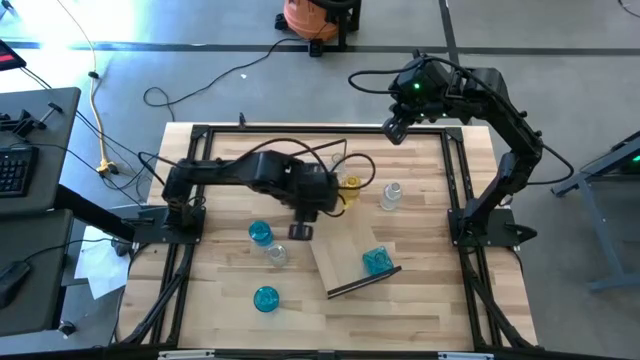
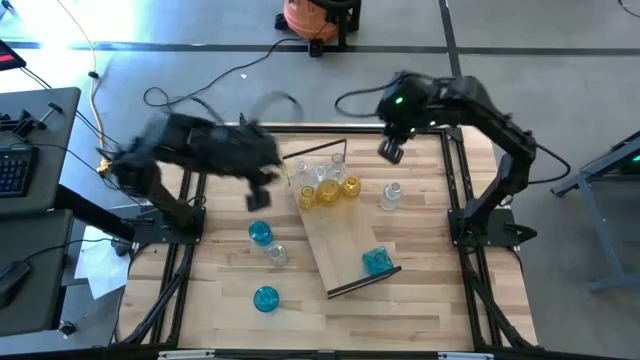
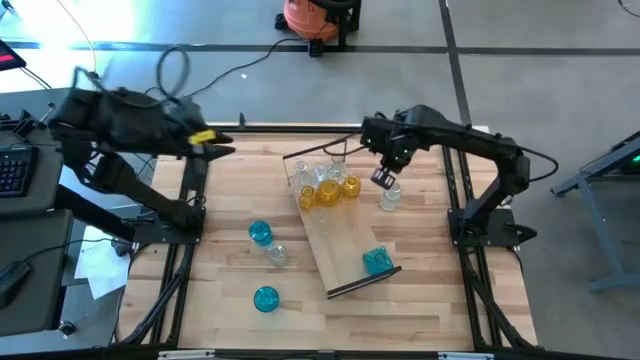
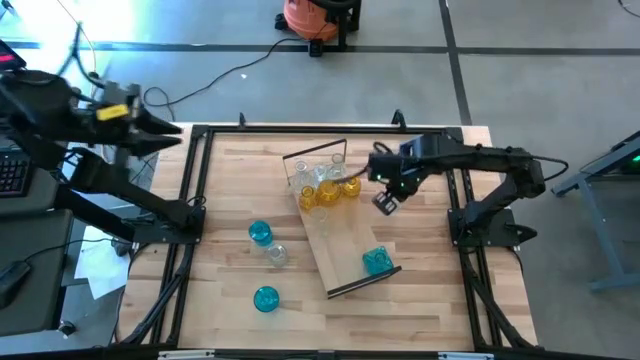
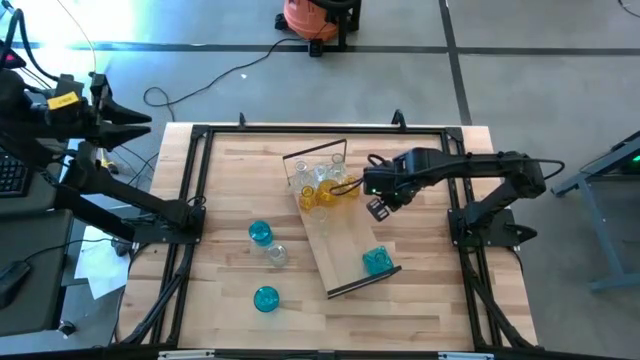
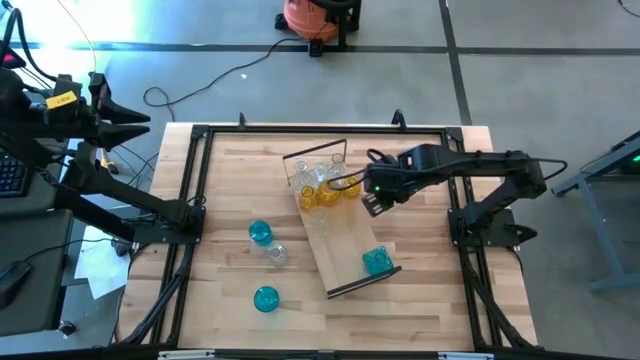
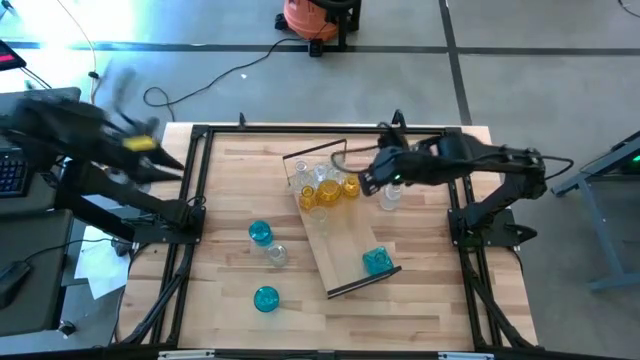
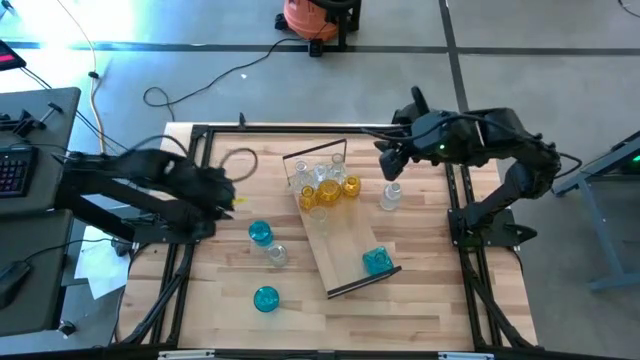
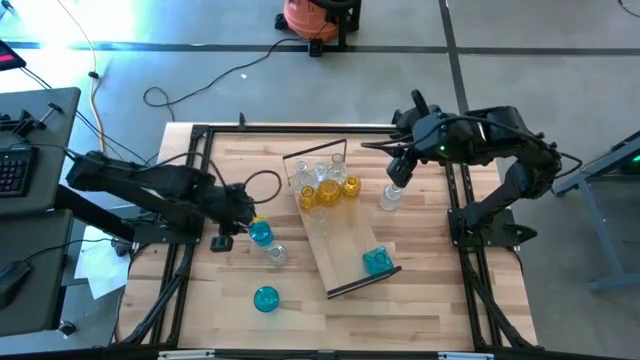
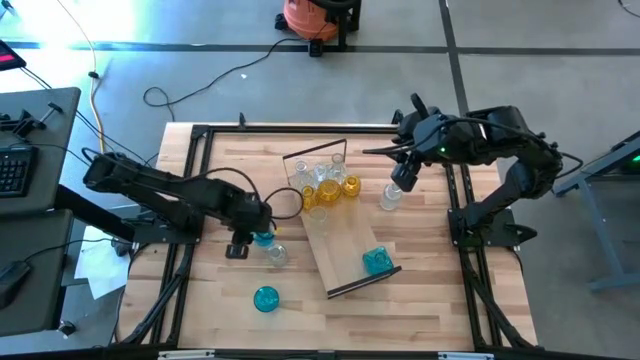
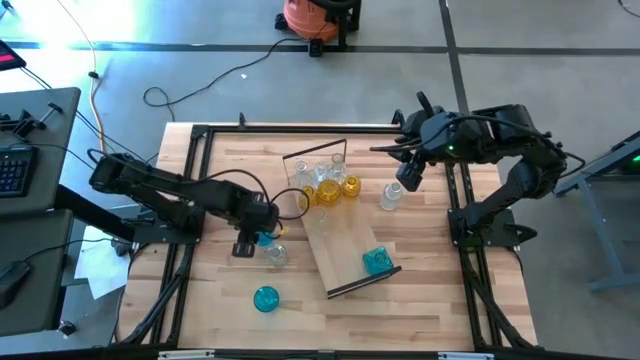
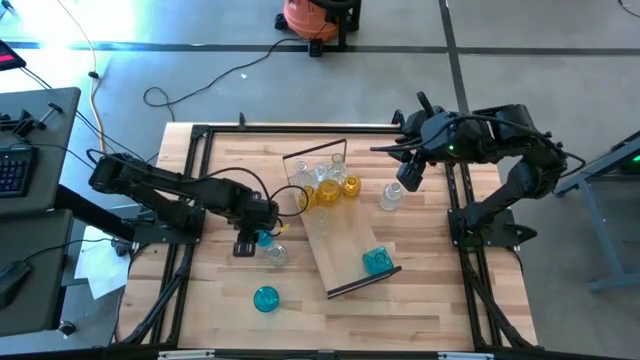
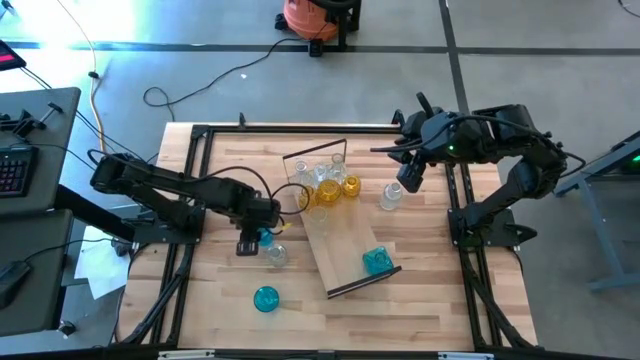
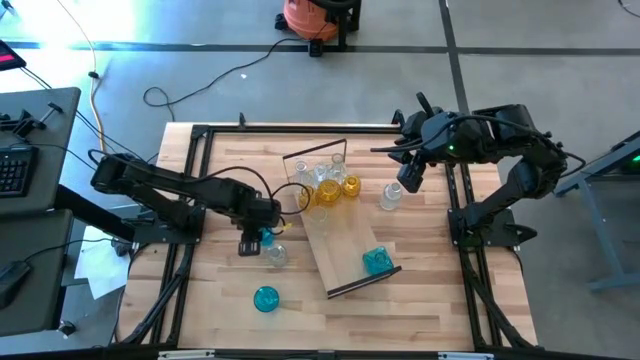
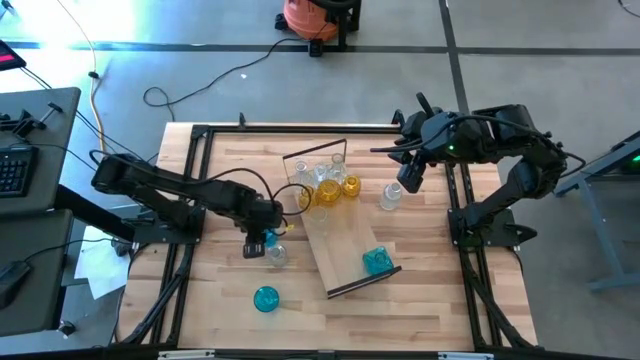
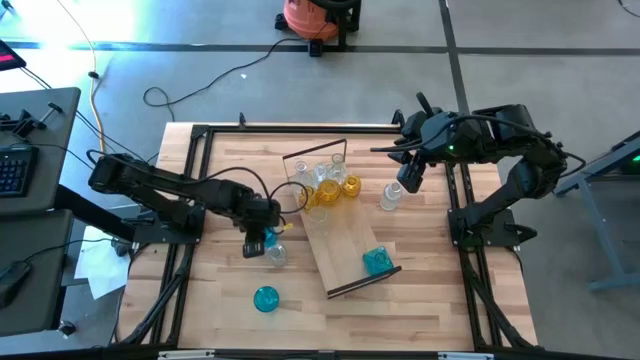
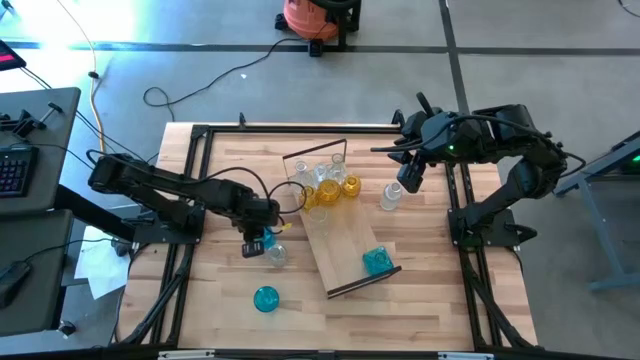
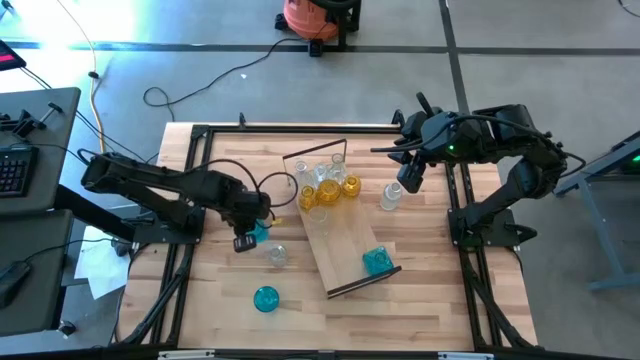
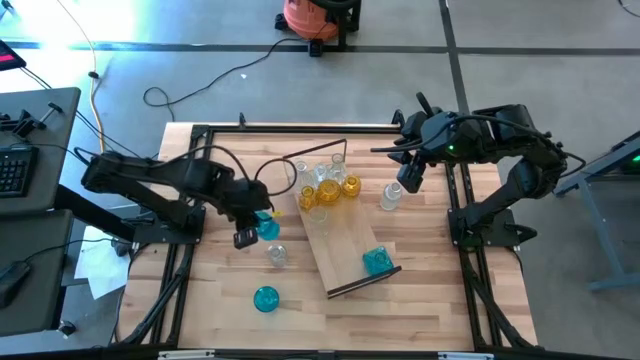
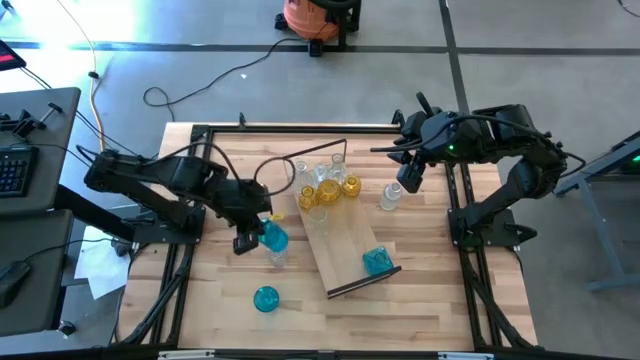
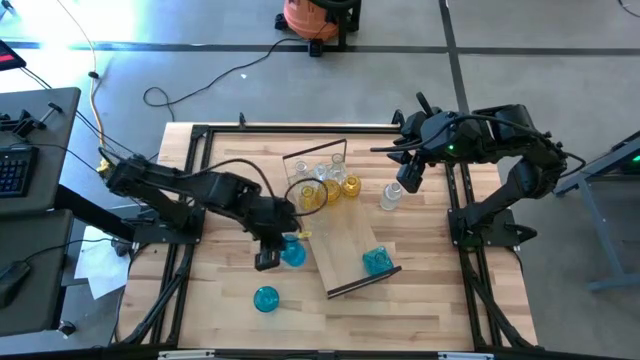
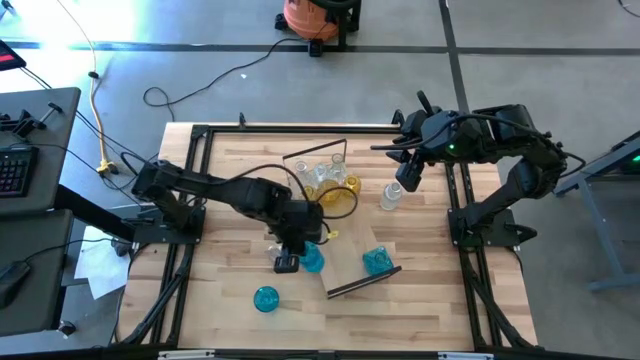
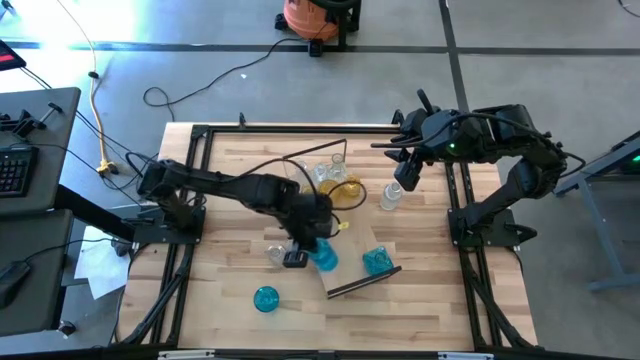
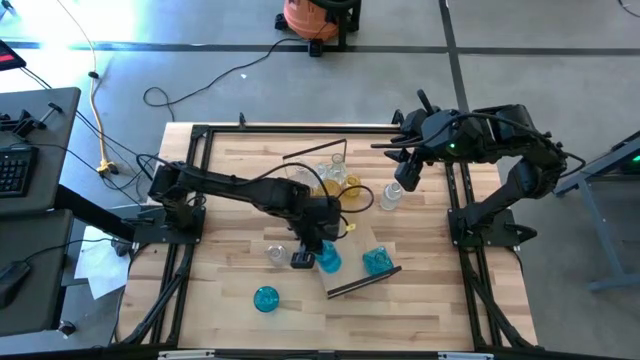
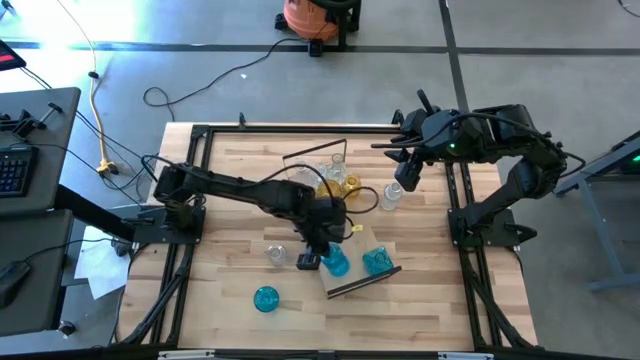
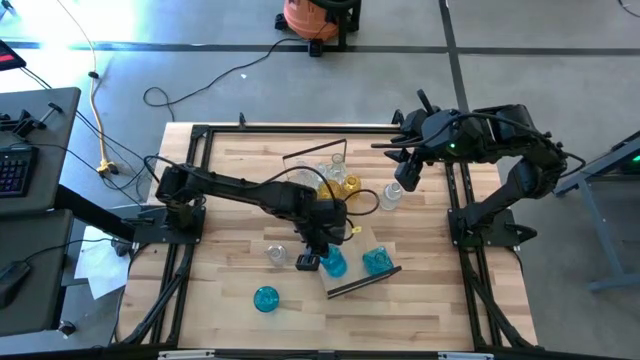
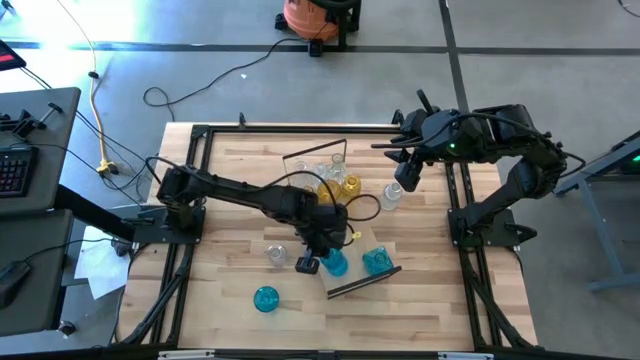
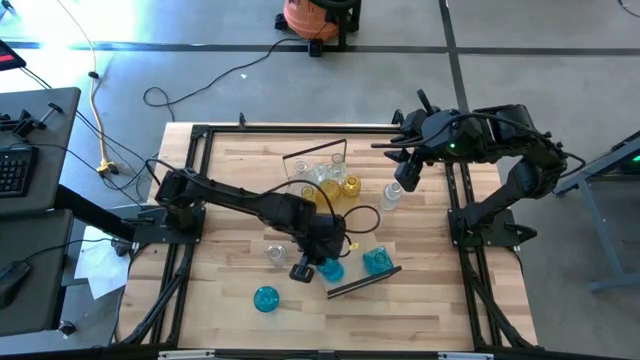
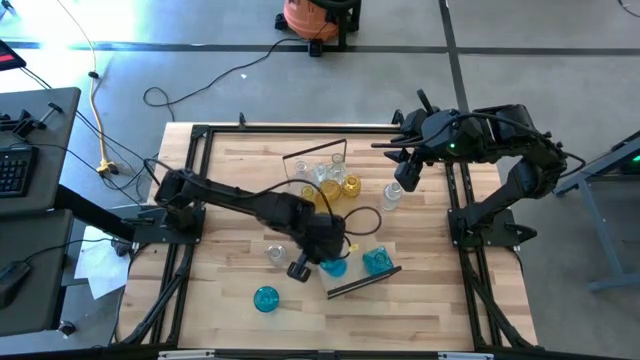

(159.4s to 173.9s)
Task: sort vases onto shelf
Put the blue crystal vase on the shelf aligned with the other blue crystal vase

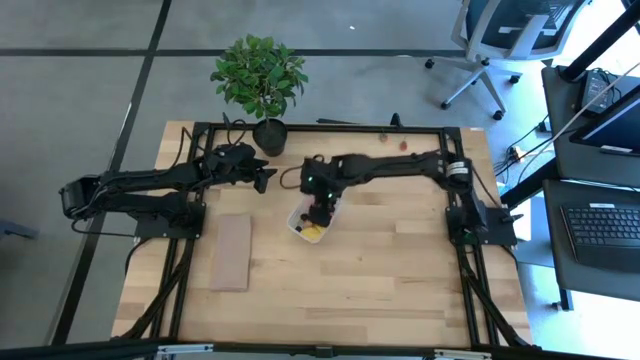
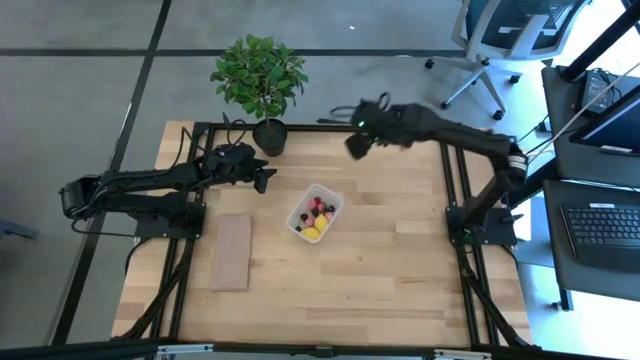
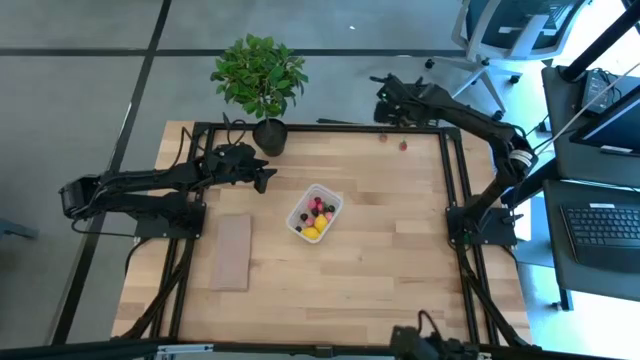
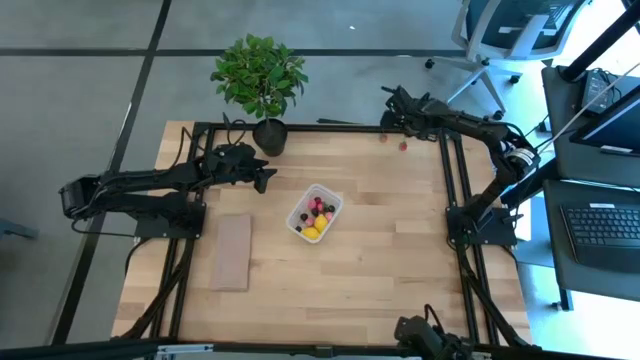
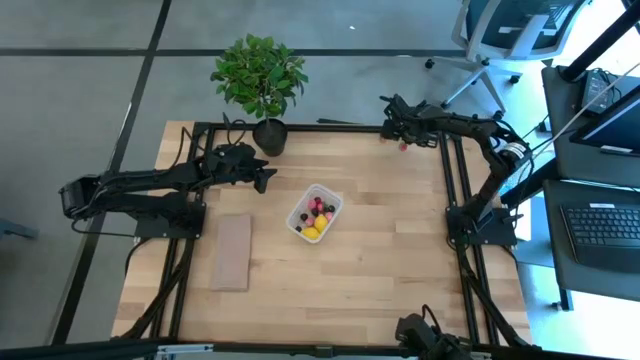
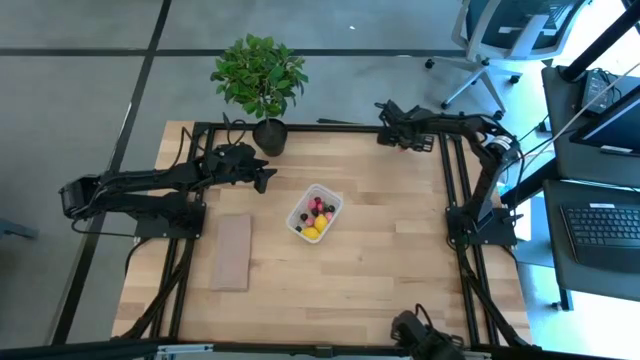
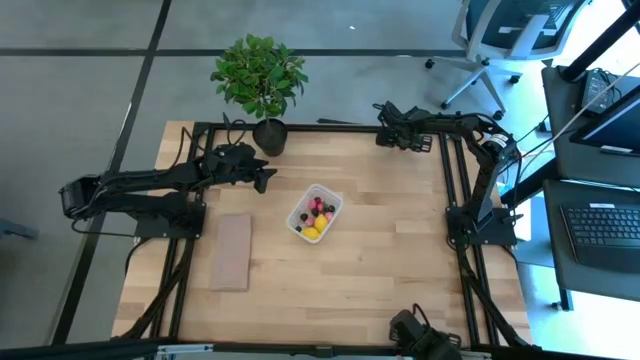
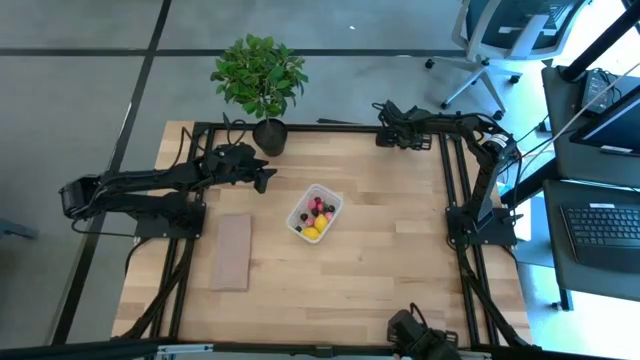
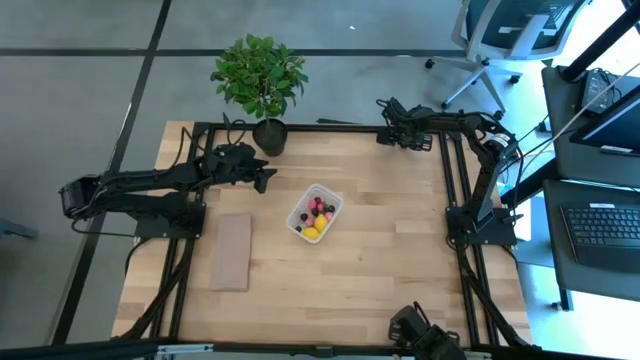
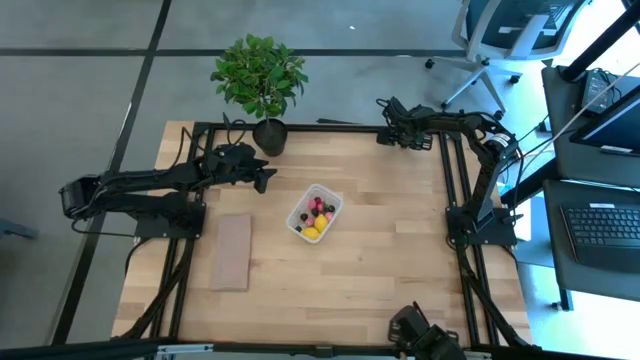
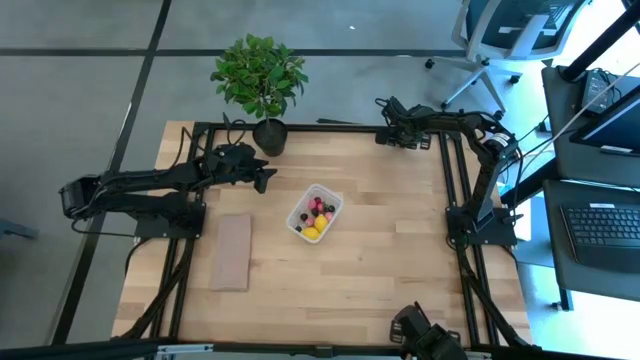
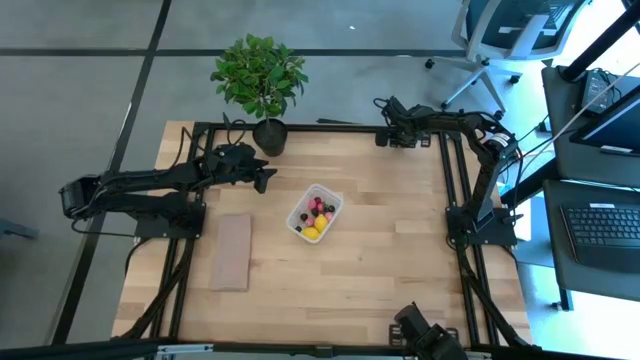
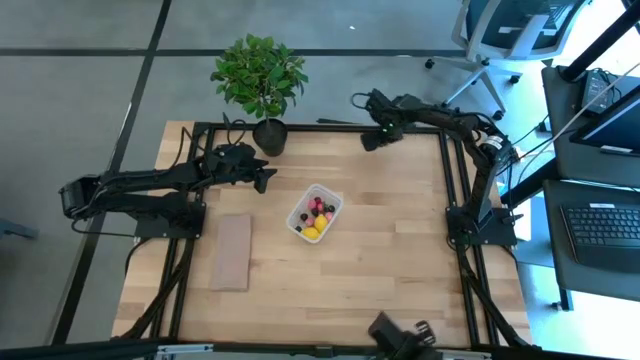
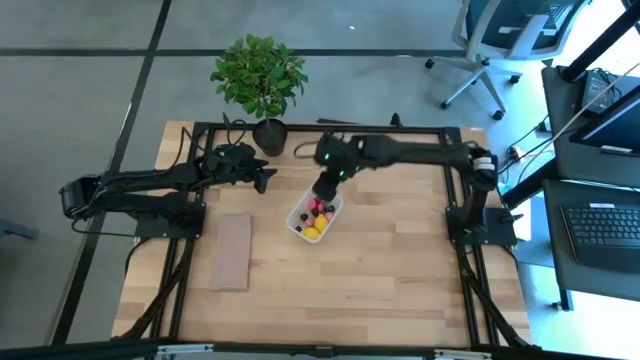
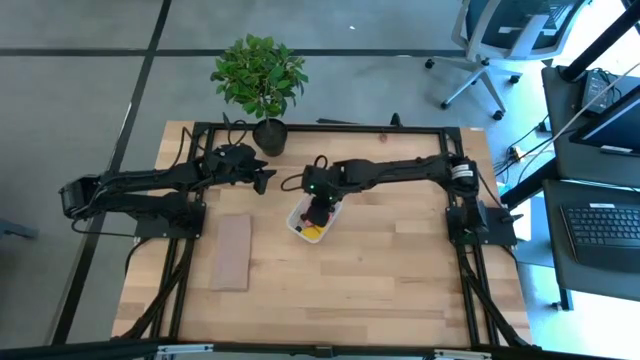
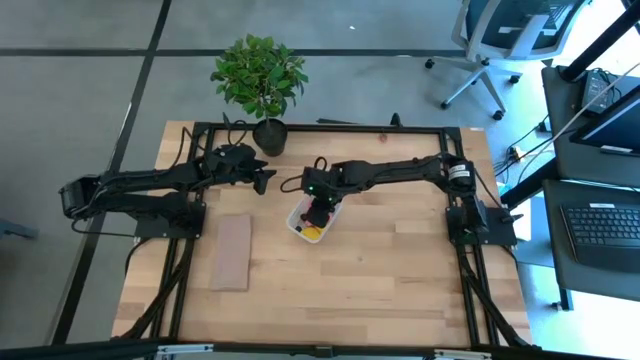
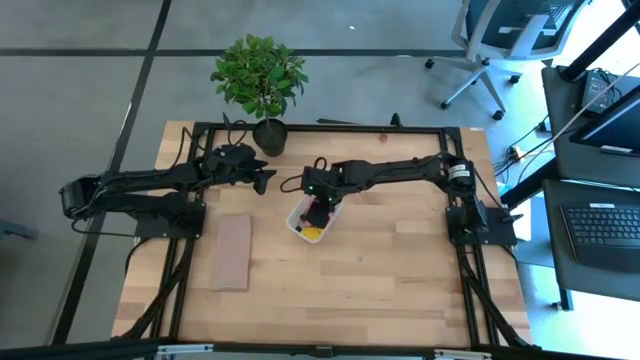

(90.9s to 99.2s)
Task: Pick and placing Produce into tupperware
Put the right strawberry into the transparent bin
